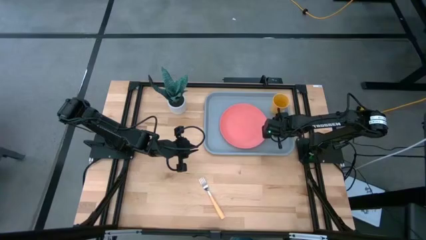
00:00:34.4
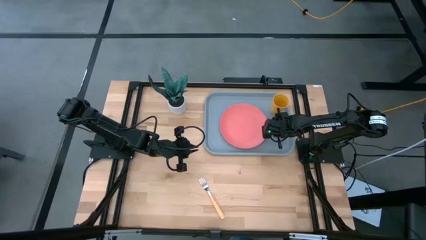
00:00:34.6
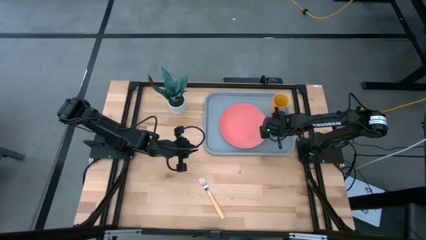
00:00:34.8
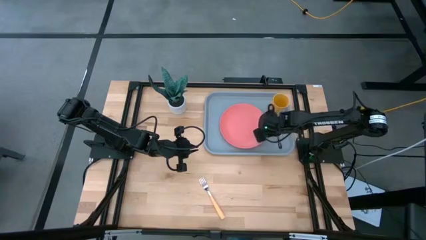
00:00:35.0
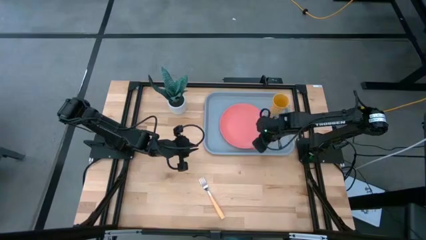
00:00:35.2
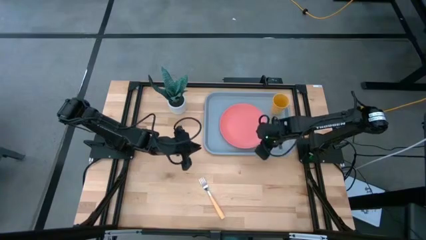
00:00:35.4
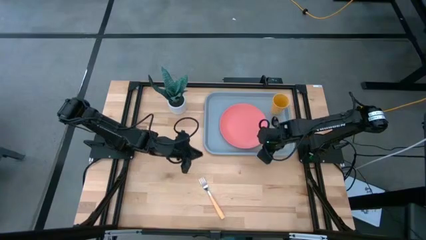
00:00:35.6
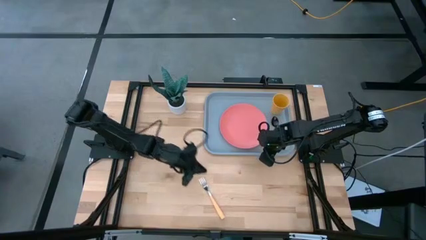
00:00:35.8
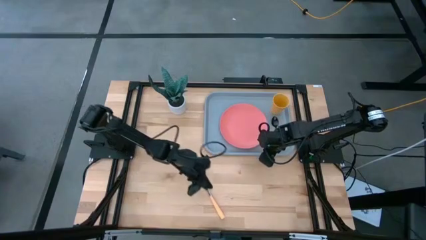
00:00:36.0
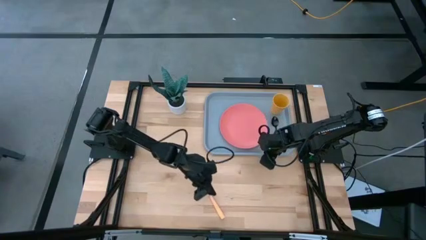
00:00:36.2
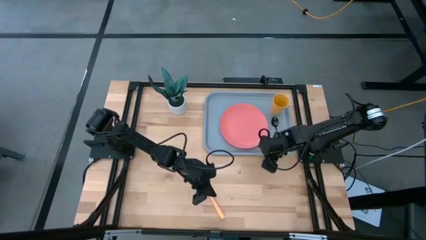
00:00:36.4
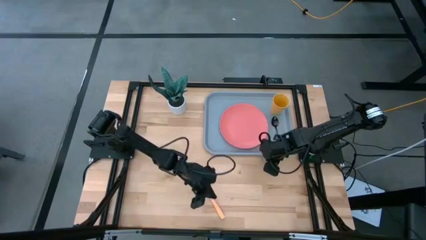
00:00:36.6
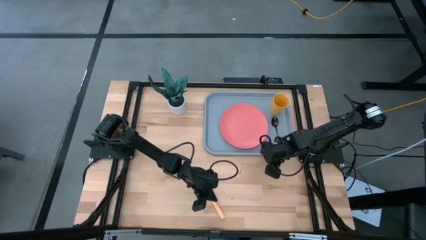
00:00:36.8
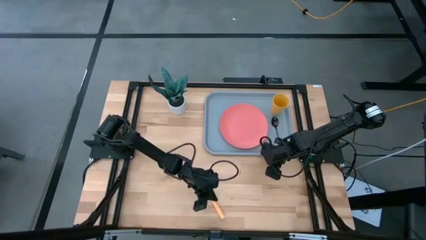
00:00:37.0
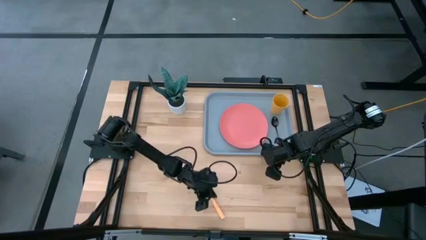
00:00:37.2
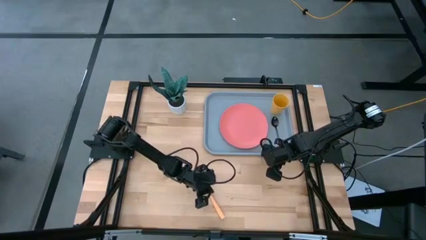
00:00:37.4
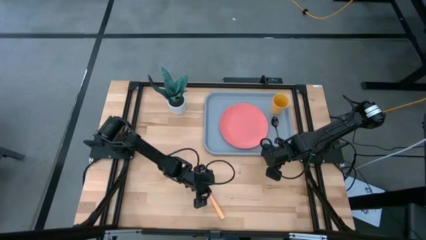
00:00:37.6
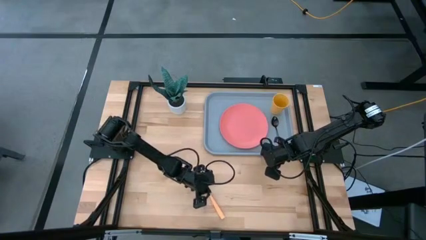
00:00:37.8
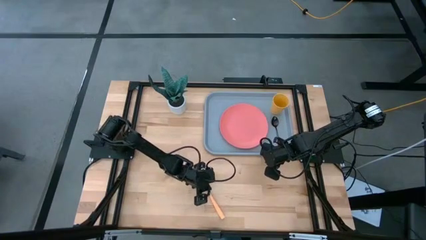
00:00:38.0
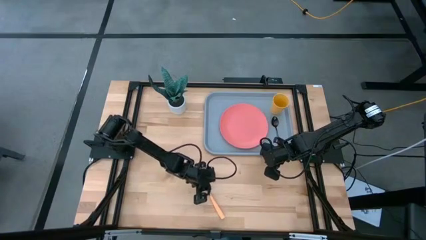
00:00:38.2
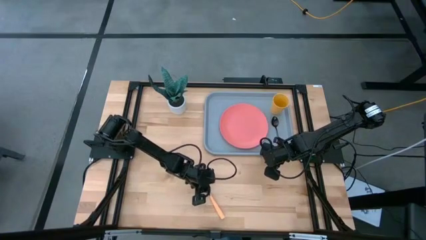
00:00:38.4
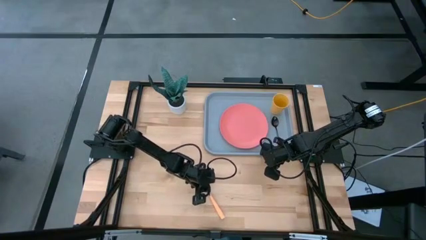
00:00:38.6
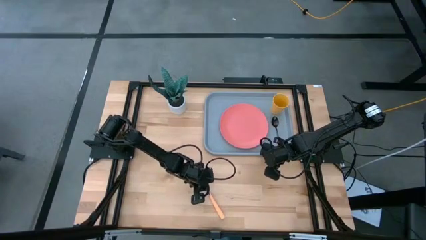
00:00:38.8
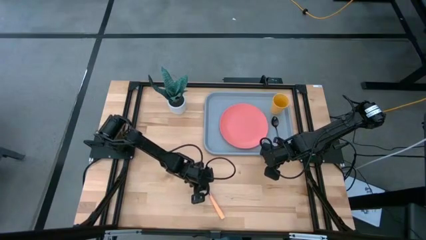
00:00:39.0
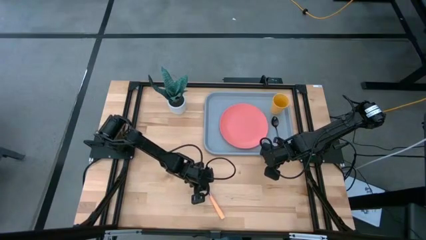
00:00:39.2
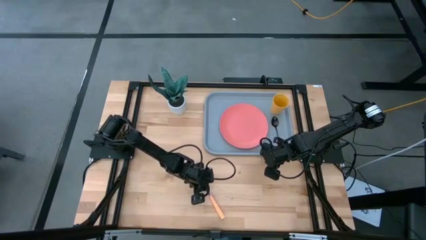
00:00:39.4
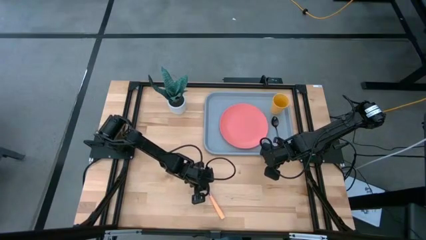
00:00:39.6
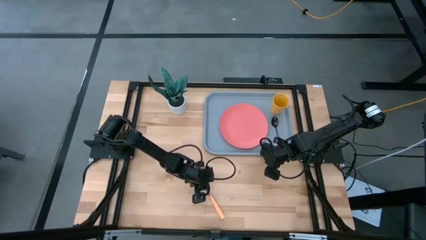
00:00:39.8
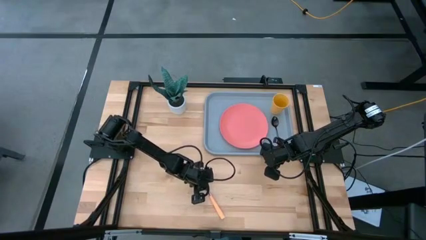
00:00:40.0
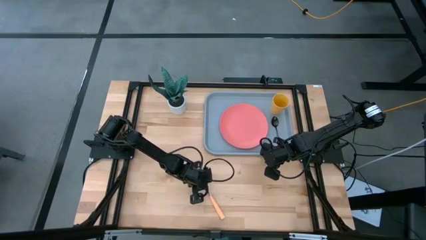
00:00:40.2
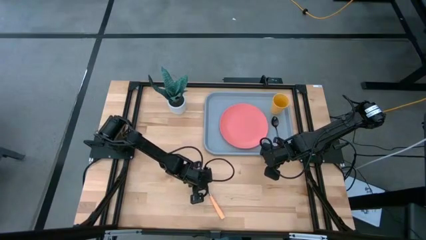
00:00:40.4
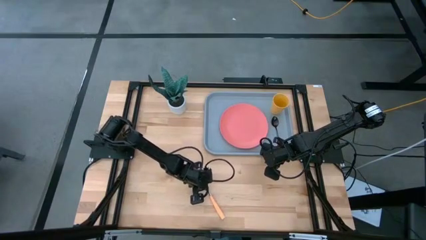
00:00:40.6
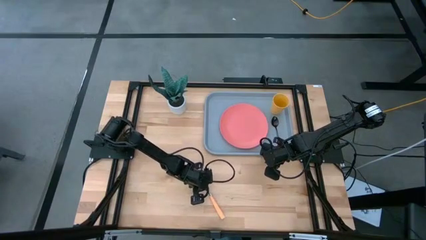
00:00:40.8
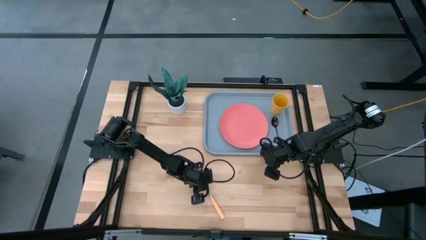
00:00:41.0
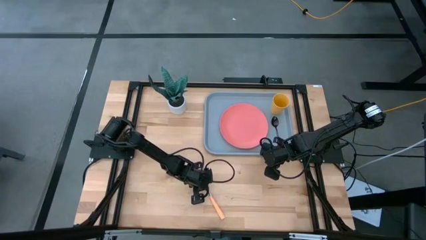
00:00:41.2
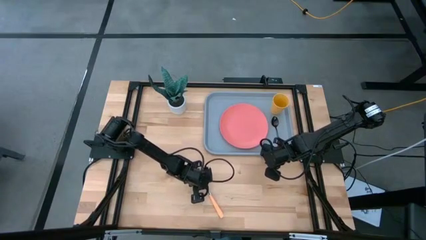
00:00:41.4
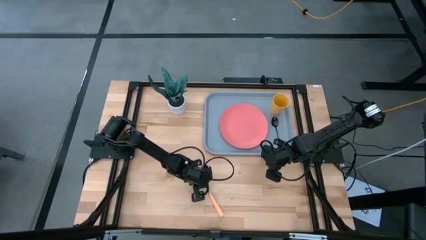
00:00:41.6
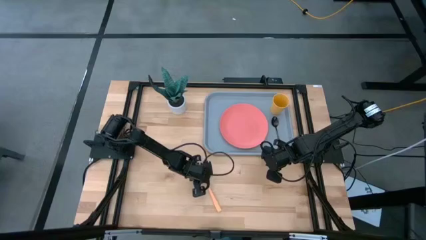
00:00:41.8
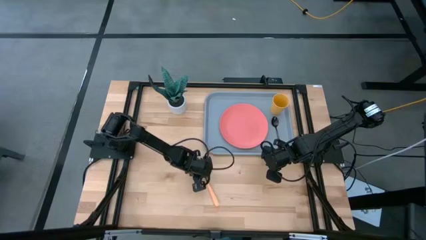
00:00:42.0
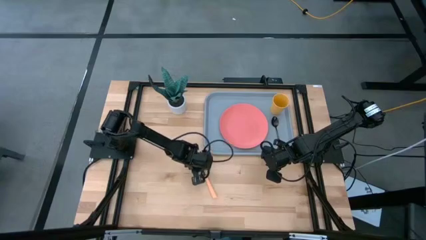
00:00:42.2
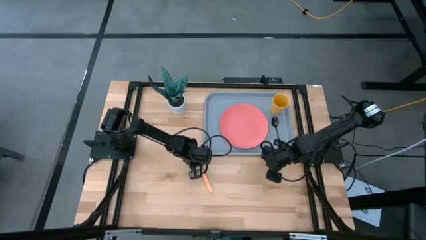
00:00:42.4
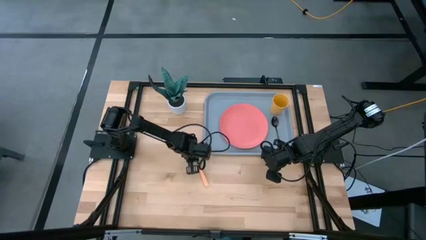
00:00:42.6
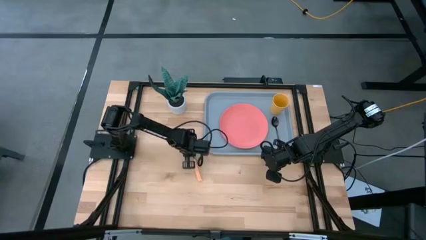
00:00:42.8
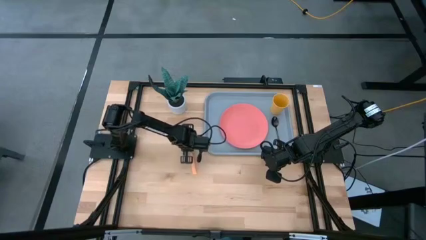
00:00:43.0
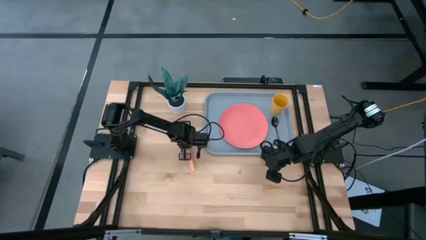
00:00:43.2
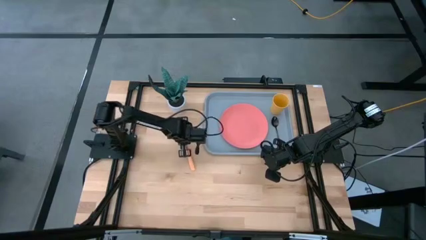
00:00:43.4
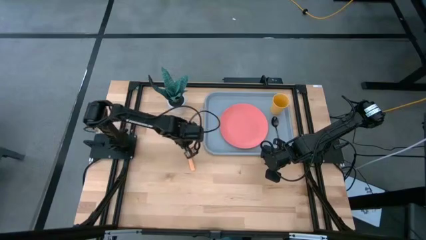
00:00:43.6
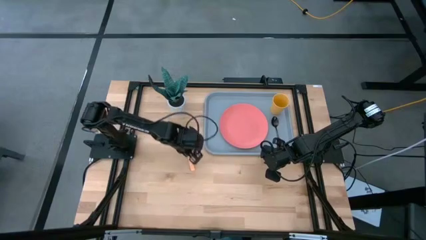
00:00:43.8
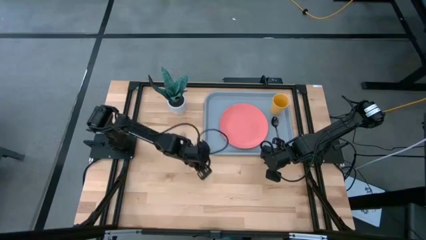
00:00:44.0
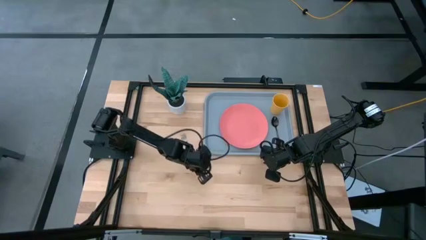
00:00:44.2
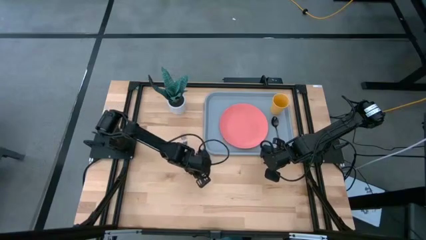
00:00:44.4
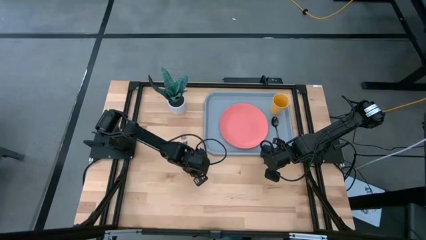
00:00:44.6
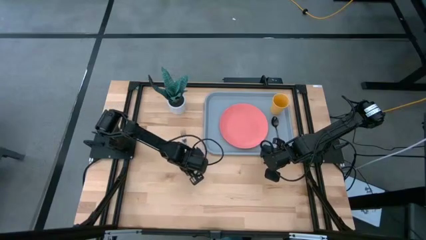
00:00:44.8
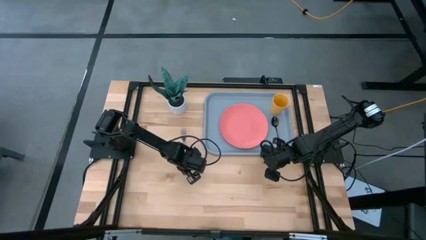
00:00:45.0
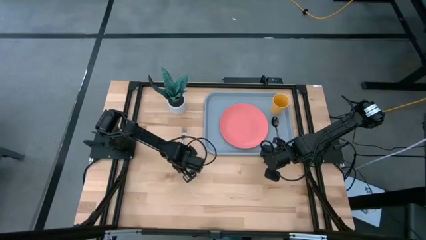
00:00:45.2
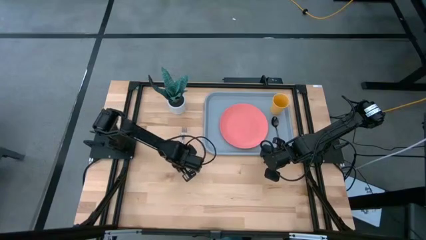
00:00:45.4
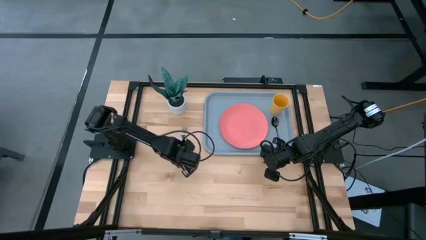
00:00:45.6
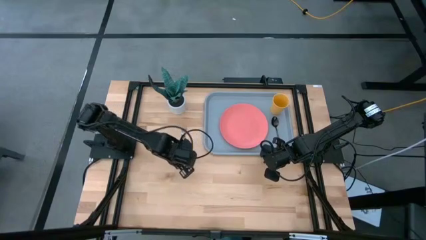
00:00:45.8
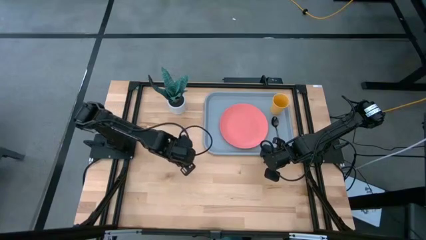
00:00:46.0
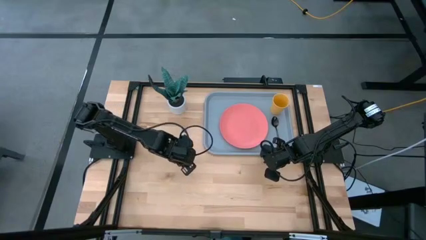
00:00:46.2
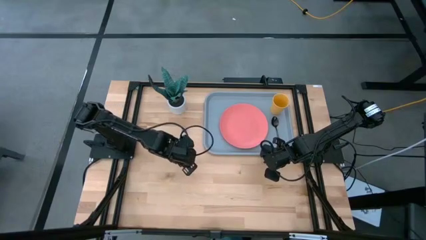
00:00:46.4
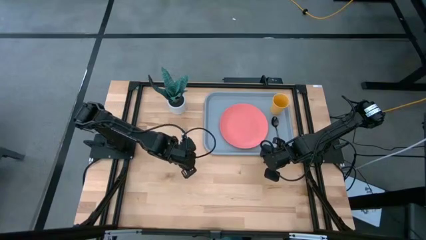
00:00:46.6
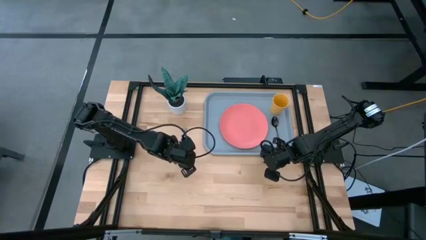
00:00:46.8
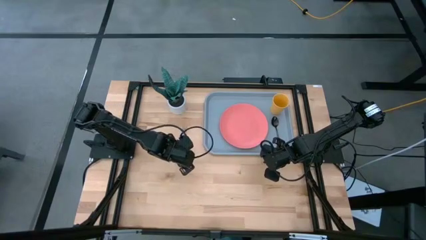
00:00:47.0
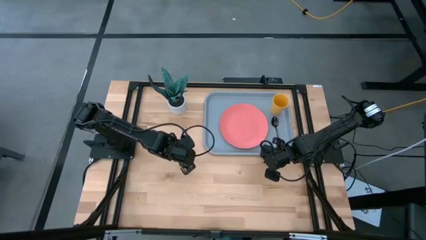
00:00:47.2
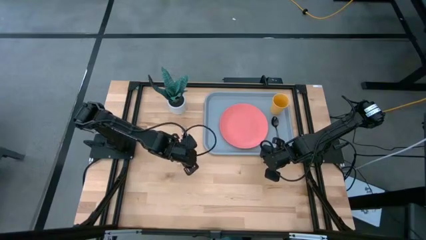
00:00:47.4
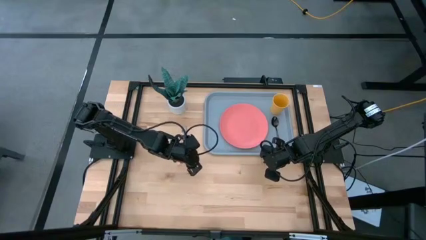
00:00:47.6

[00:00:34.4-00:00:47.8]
Task: Pick and place plate/cup/fork/spoon on tray
Put the orange fork to the left of the pink plate on the blue serving tray

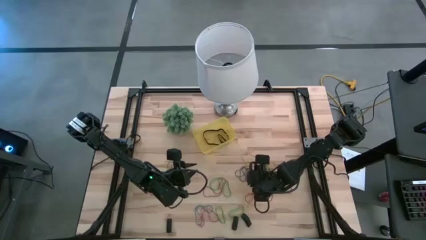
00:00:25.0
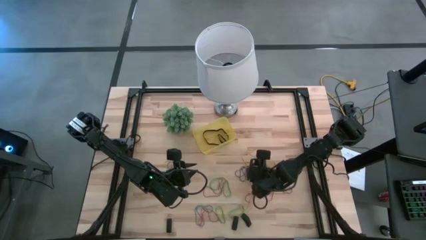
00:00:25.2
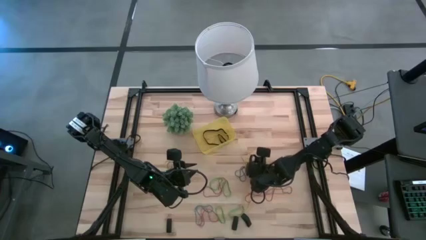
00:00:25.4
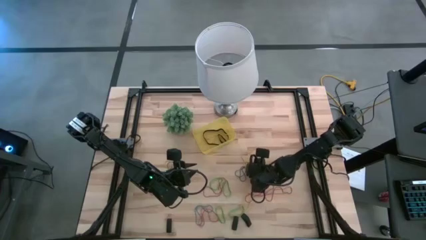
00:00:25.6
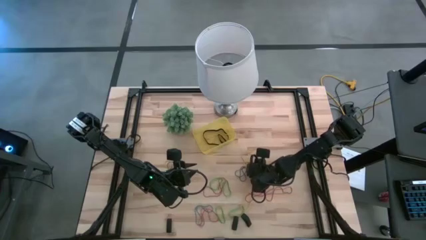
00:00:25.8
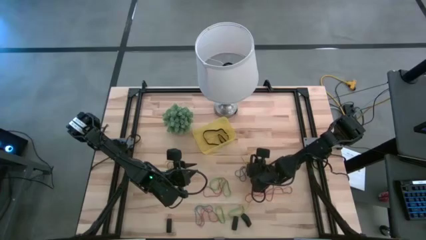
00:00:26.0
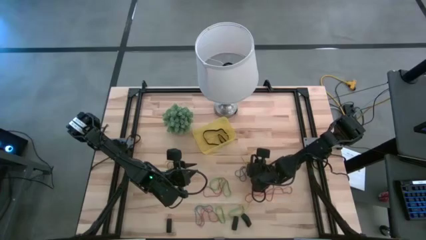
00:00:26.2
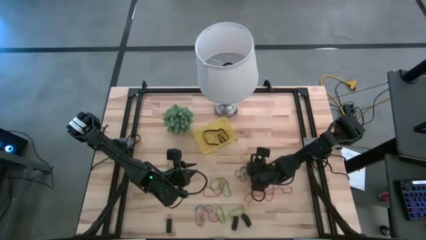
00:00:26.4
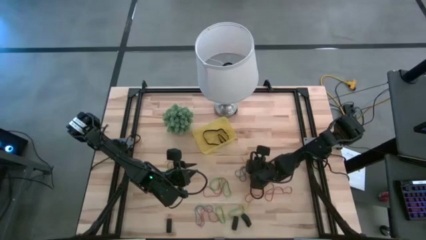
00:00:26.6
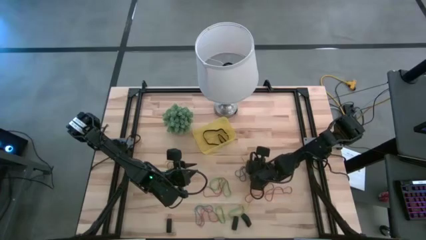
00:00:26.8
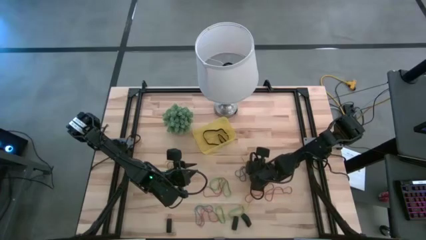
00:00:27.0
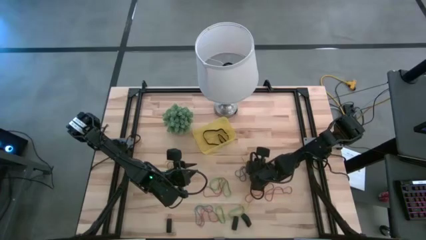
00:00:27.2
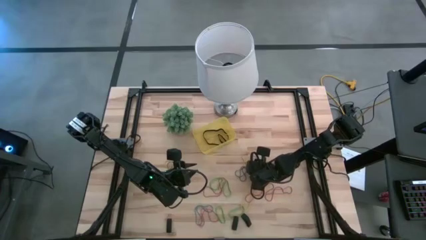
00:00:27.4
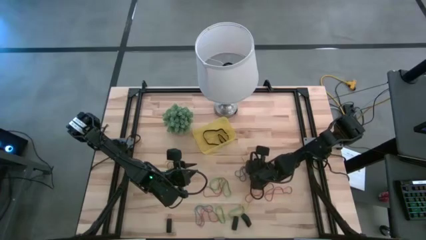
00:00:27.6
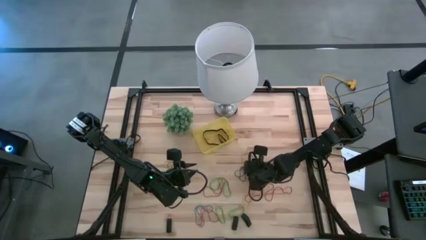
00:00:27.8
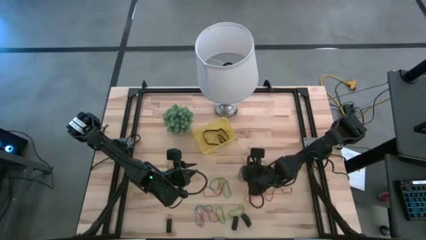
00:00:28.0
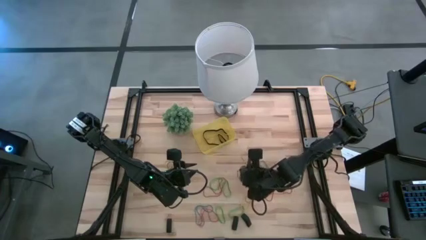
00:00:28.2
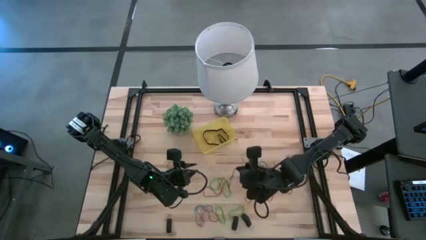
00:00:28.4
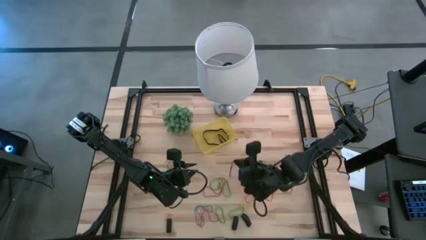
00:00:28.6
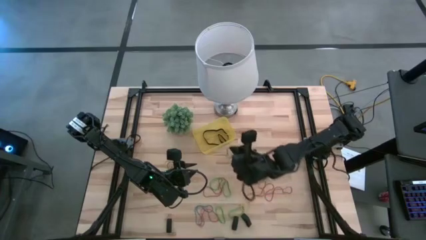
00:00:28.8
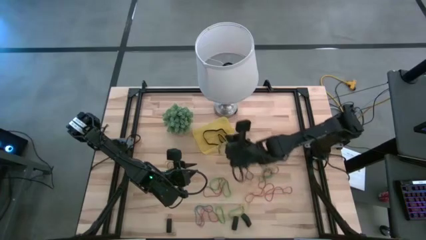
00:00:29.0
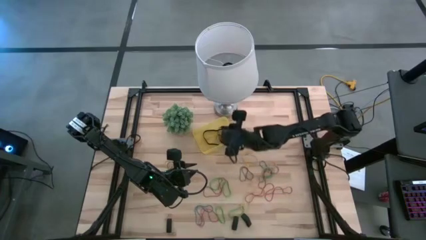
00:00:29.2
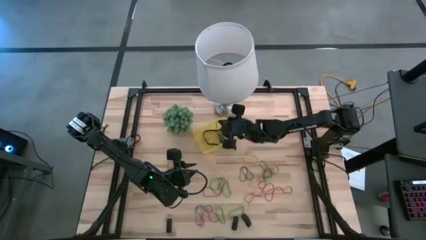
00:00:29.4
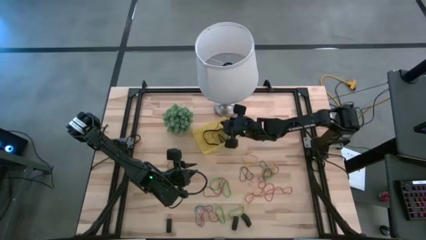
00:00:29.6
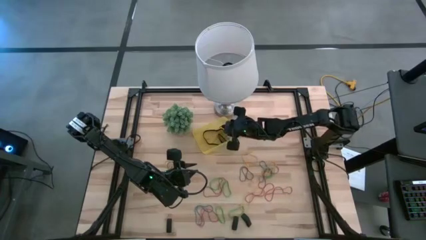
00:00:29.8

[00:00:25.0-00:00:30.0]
Task: Pick and place rubber bands into bin
Put the top purple rubber band into the yellow bin
